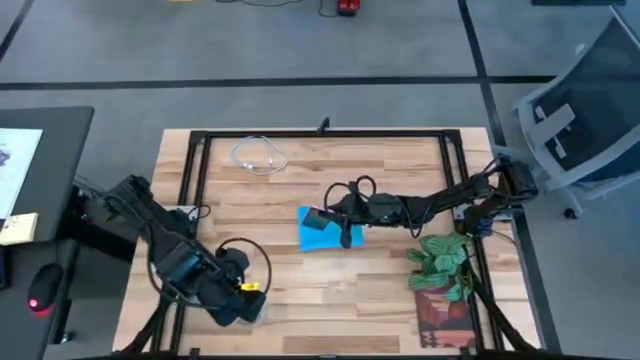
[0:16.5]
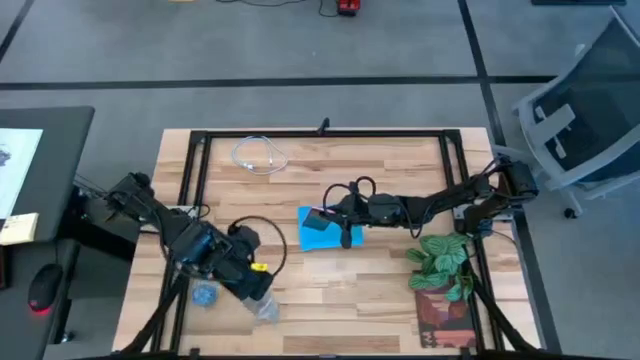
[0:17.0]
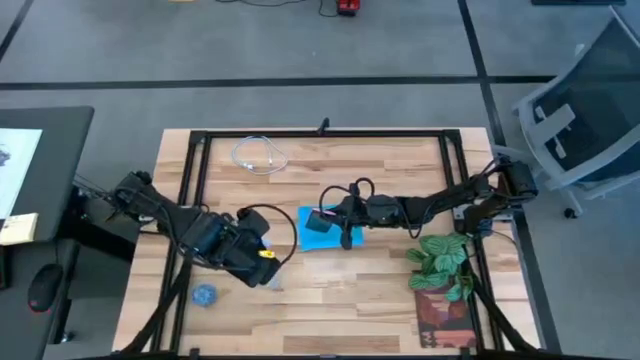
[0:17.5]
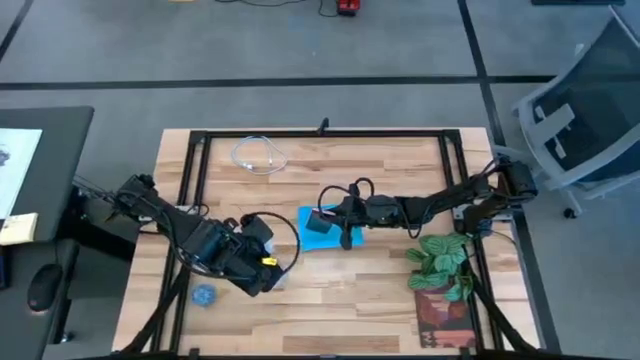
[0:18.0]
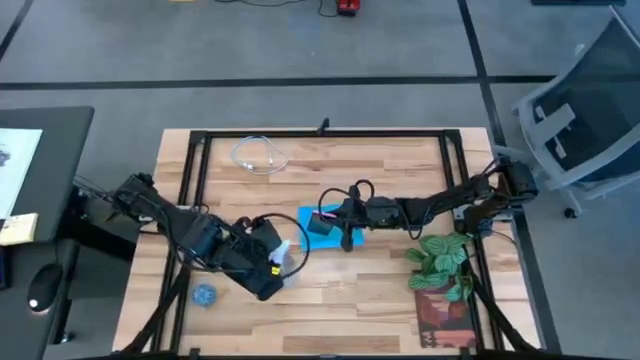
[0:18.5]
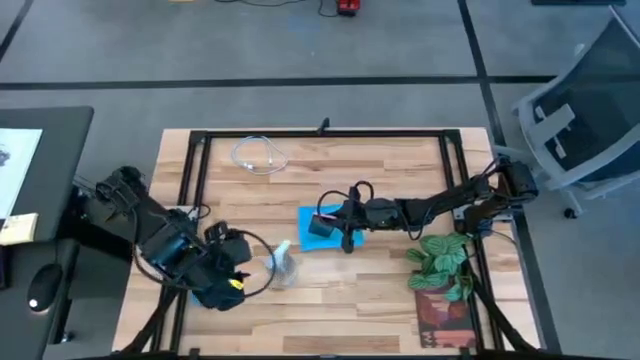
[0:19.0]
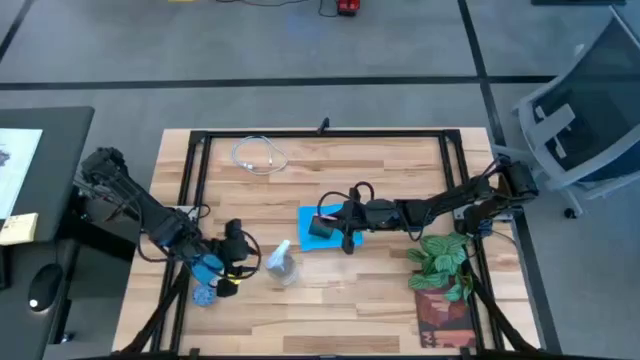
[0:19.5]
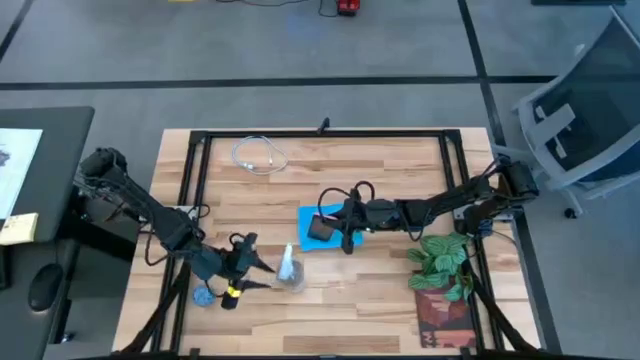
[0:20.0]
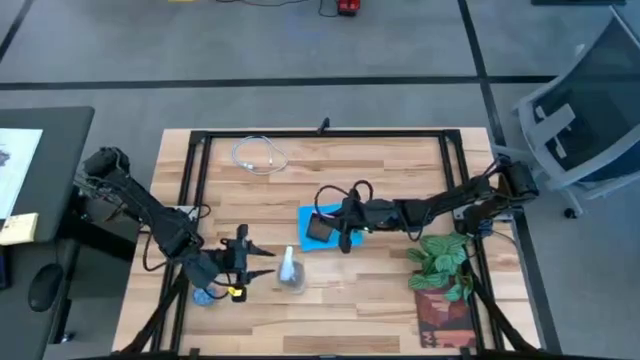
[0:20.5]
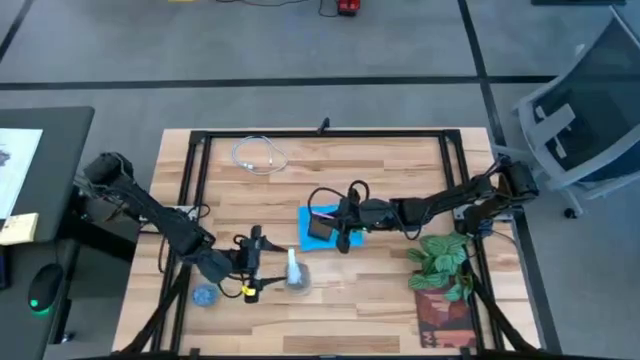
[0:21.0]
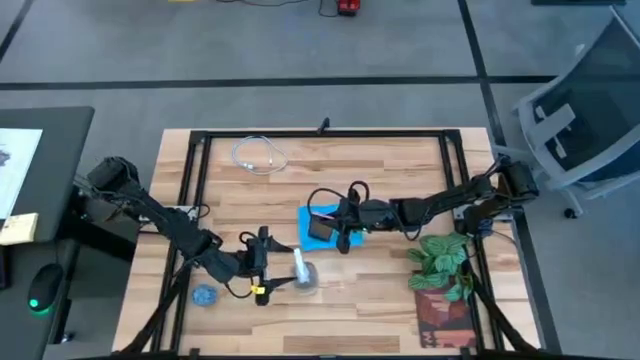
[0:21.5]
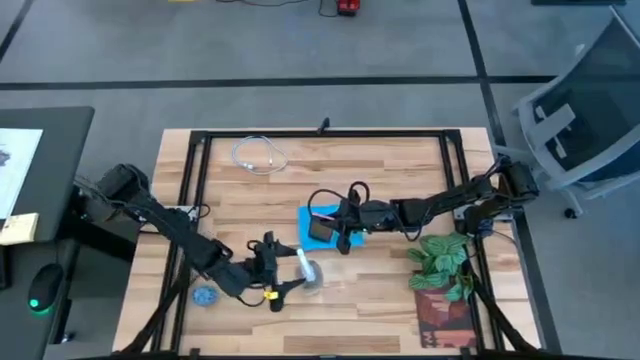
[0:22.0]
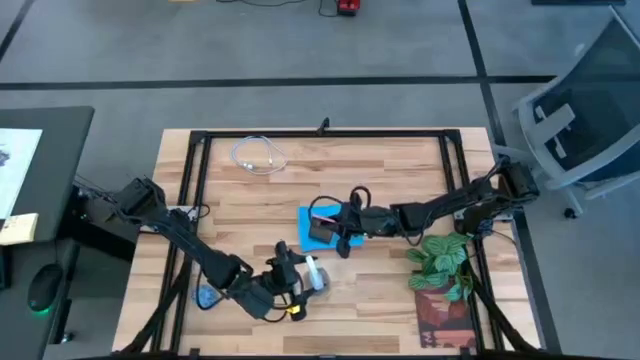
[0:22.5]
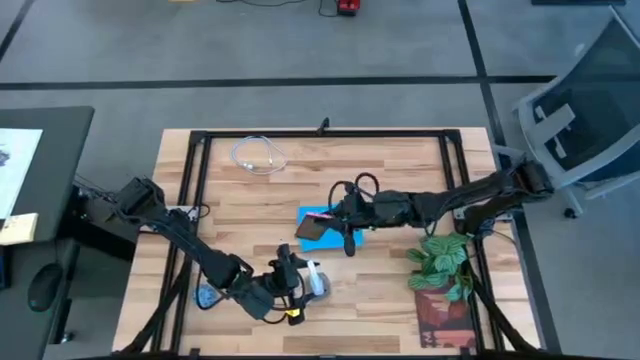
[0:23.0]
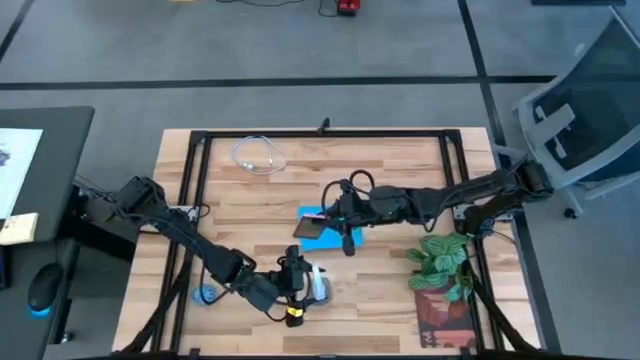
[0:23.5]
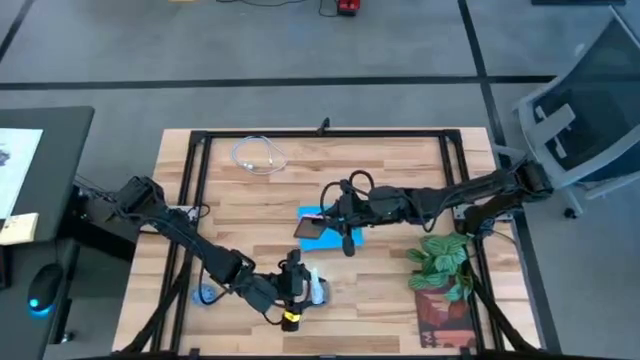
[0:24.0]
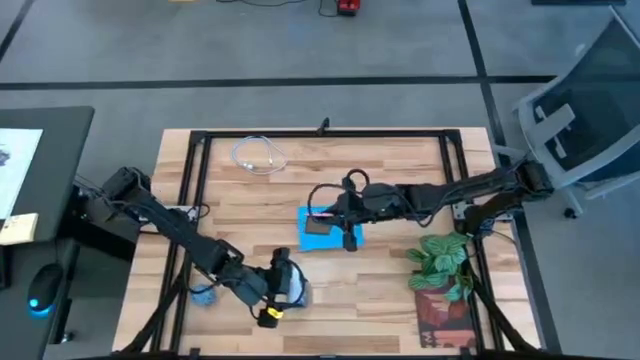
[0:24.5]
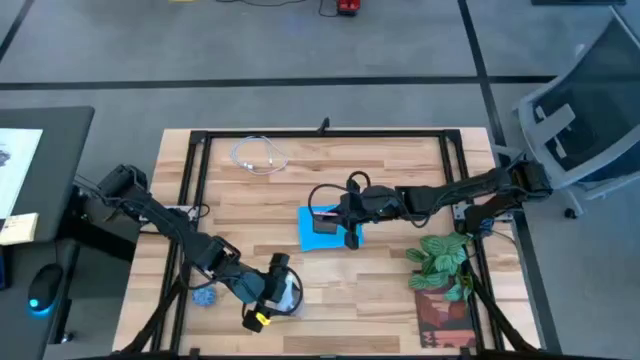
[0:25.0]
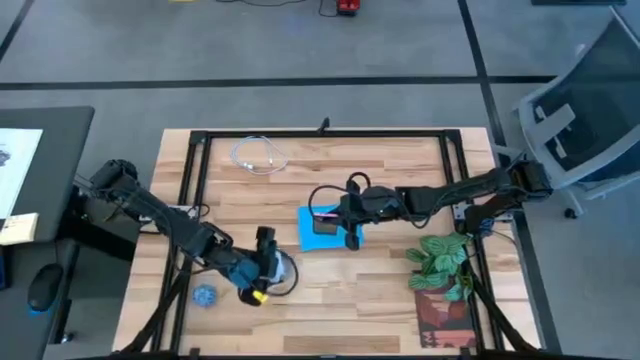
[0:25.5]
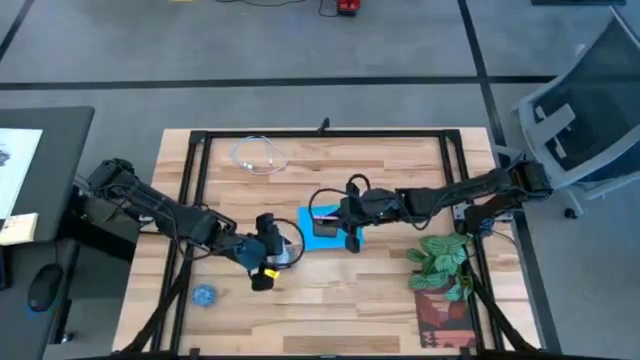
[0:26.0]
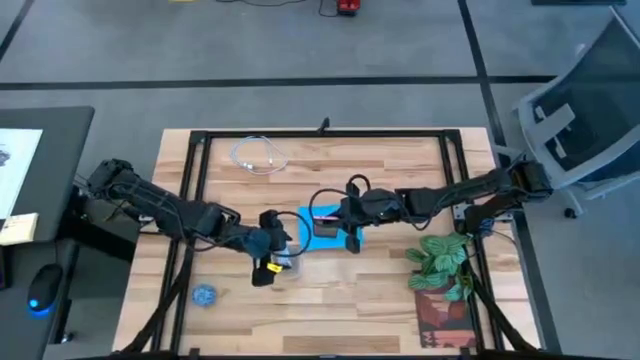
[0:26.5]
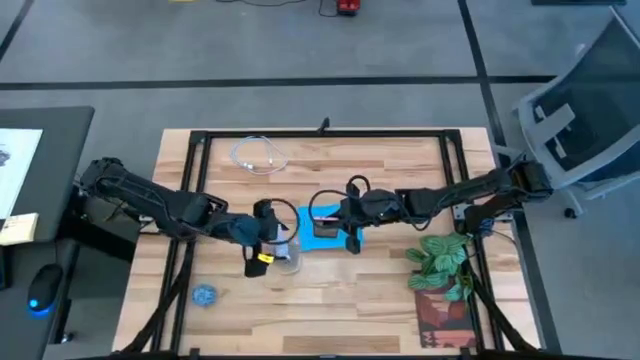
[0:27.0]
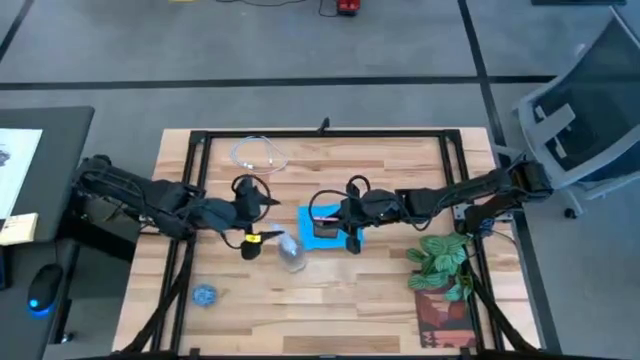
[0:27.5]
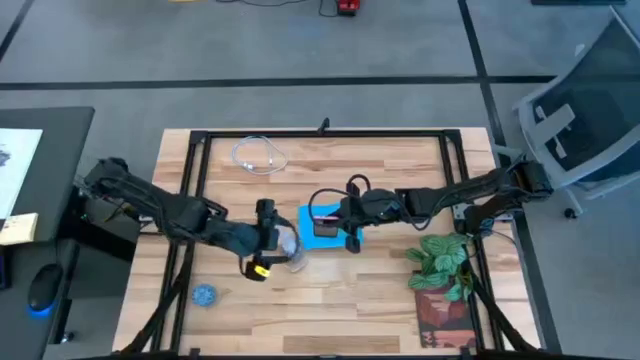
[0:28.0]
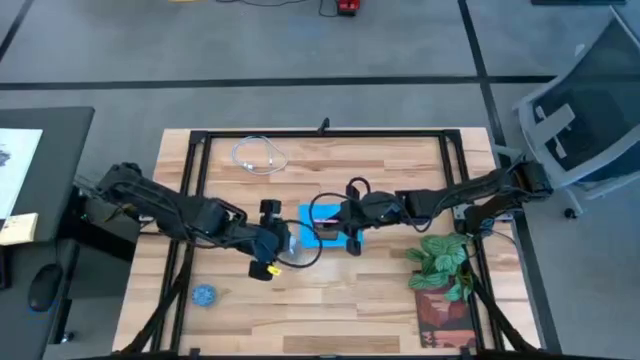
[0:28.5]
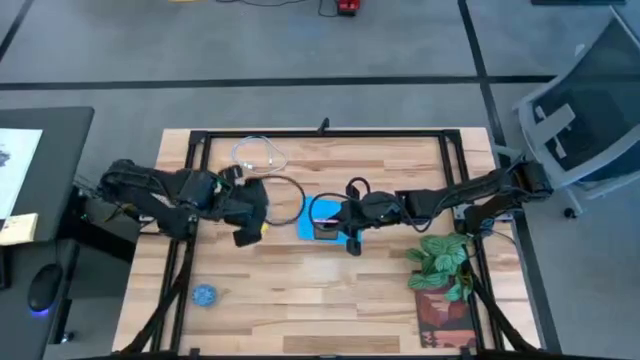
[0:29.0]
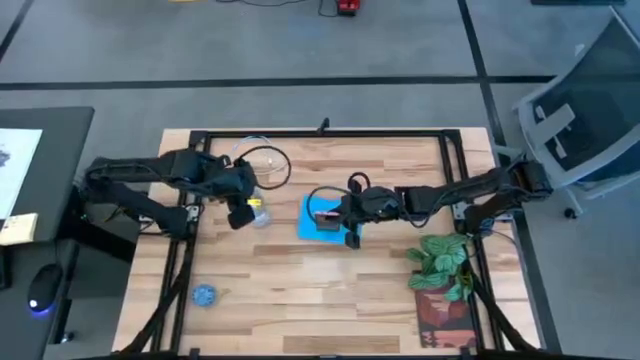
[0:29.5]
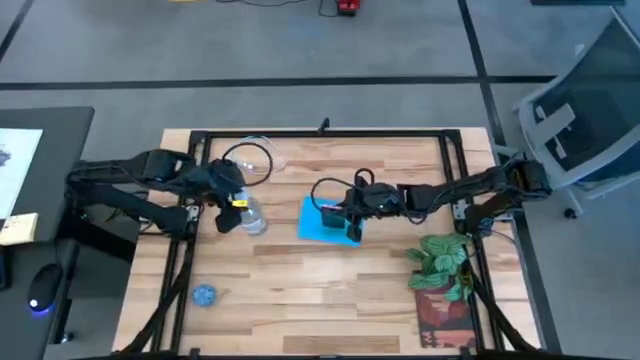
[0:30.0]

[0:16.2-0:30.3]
Task: Apply microfiber cloth
Spray the front cellphone using the spray bottle

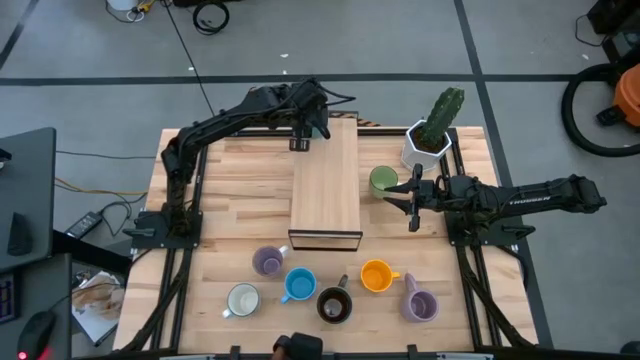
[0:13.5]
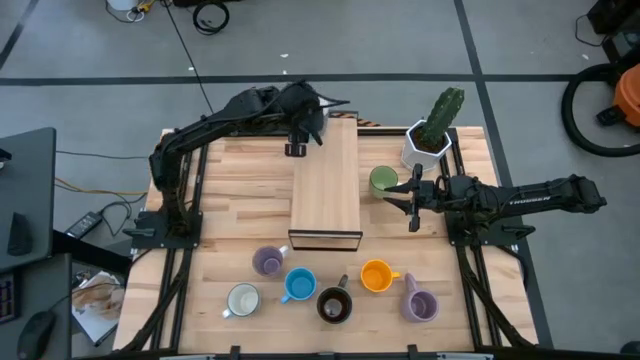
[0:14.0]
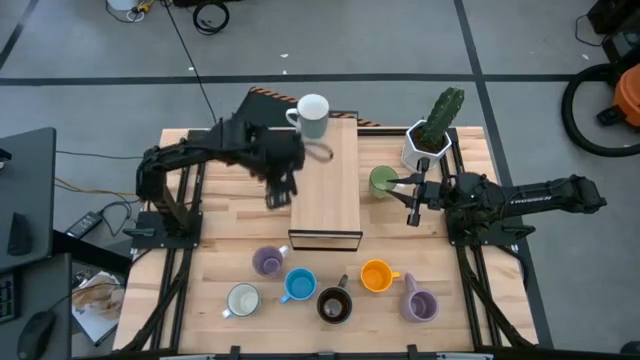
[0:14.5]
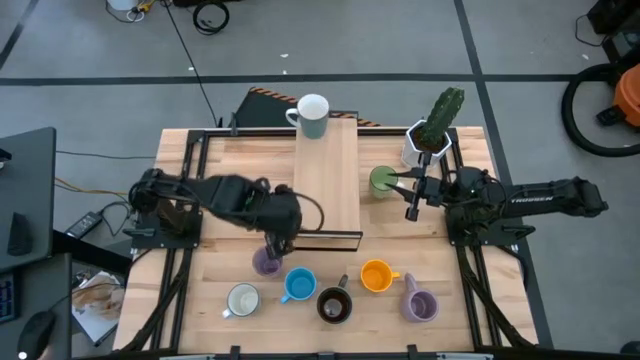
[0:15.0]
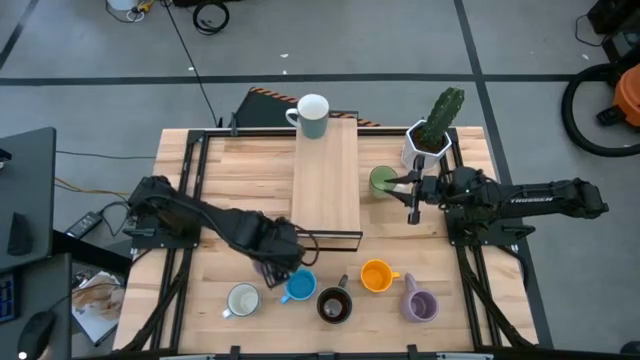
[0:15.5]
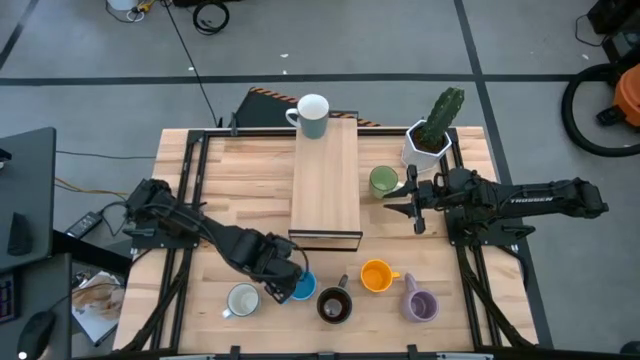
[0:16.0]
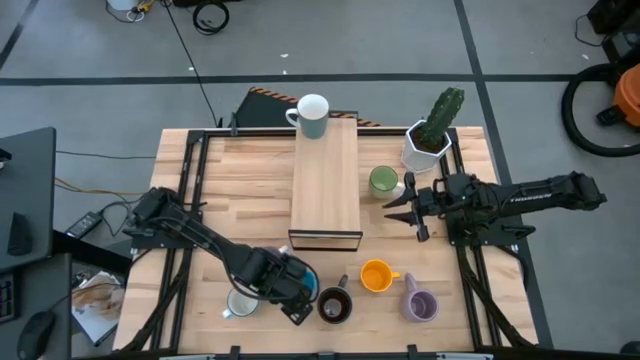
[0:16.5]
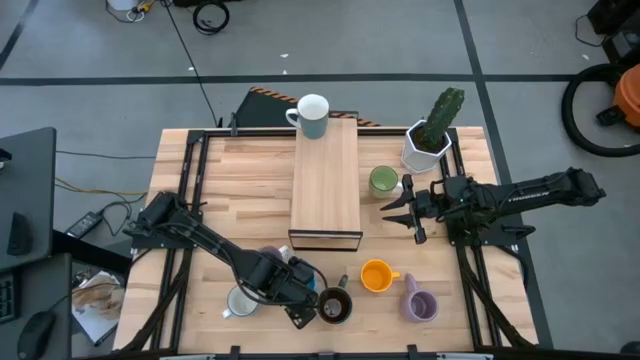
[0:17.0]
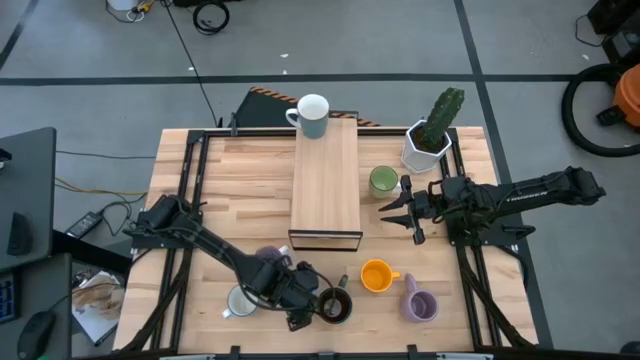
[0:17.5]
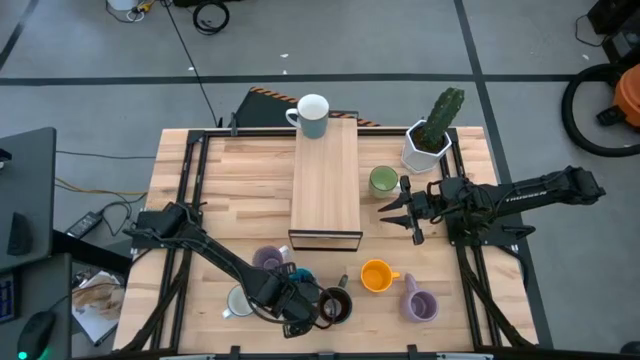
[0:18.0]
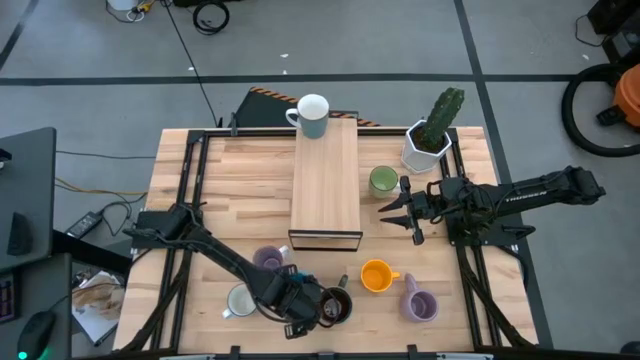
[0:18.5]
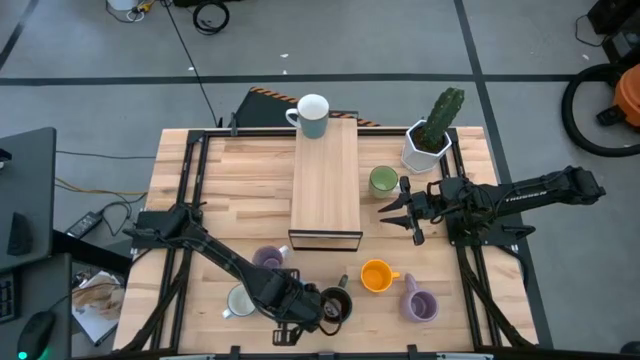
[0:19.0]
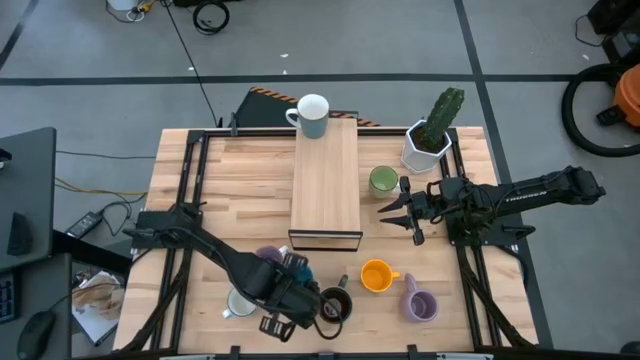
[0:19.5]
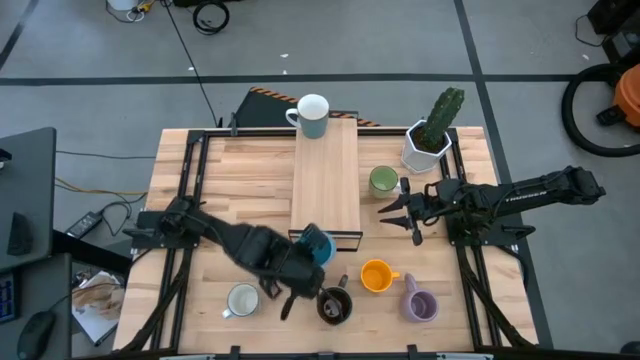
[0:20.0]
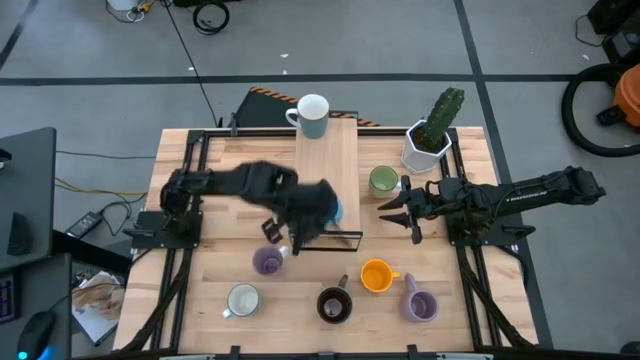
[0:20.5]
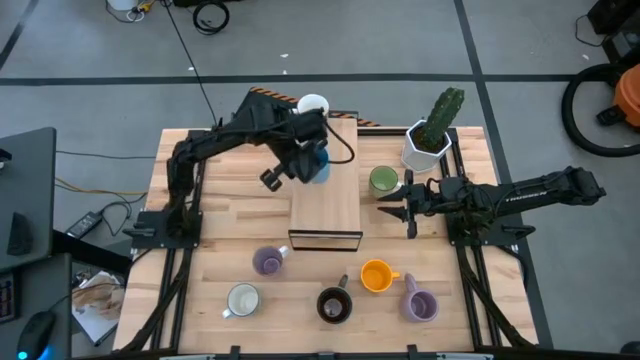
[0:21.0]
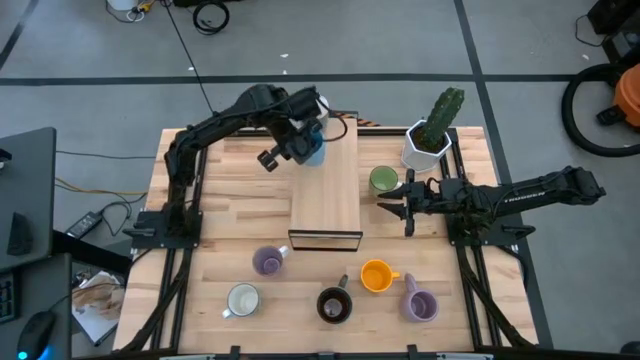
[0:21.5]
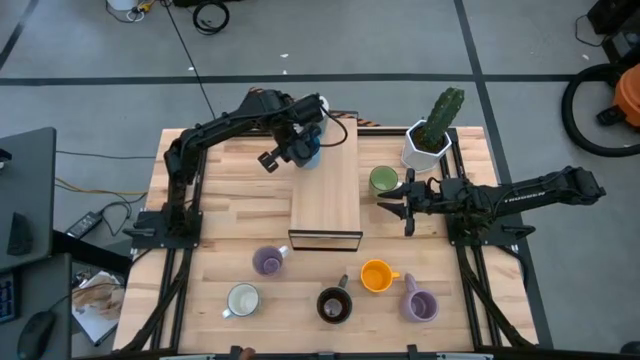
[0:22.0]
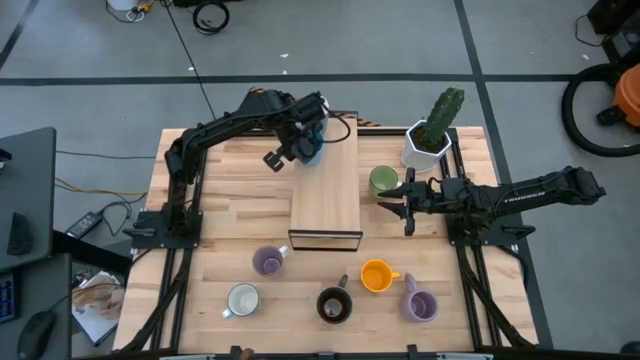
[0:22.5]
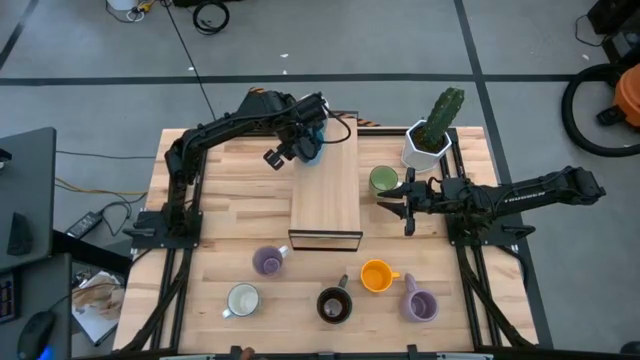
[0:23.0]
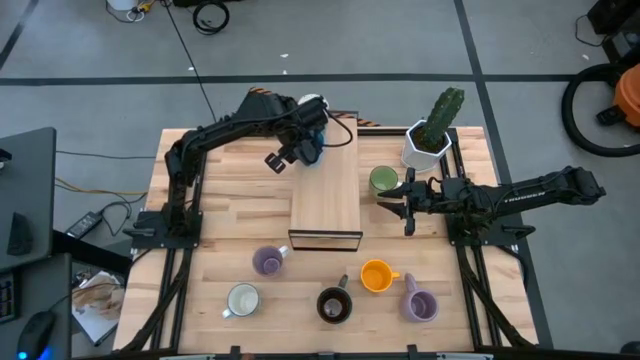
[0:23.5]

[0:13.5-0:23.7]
Task: Place coffee mugs
Put the light blue mug on the shelf
